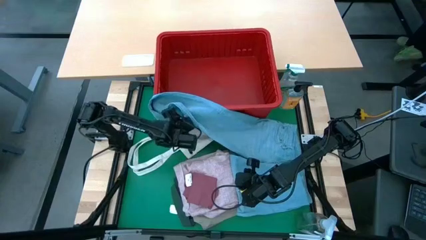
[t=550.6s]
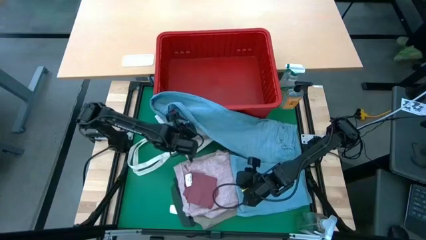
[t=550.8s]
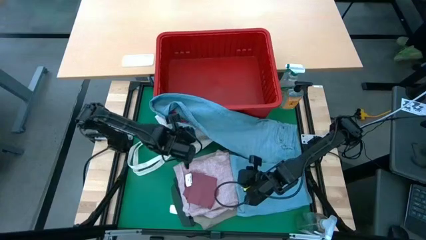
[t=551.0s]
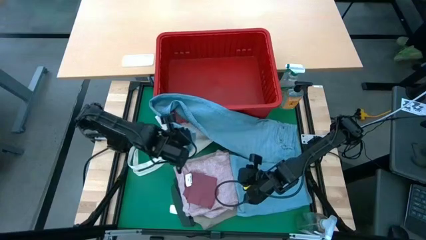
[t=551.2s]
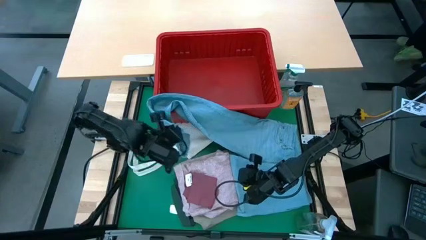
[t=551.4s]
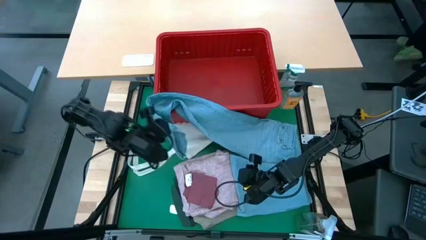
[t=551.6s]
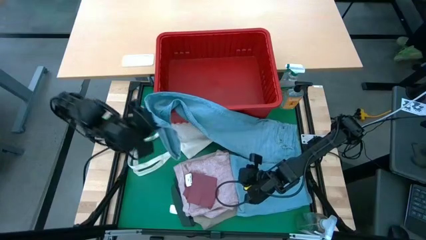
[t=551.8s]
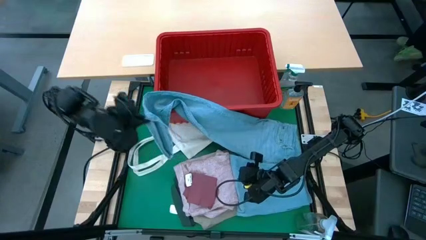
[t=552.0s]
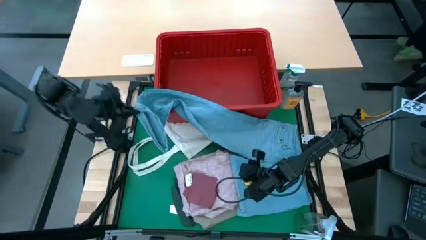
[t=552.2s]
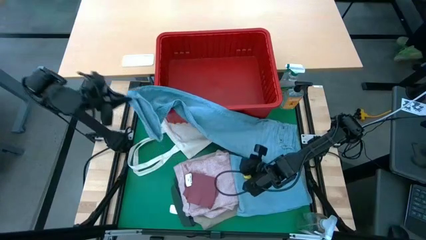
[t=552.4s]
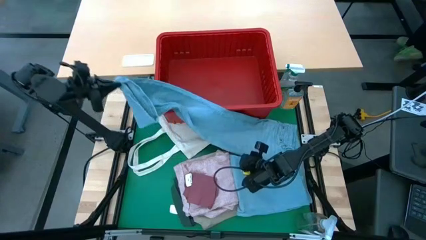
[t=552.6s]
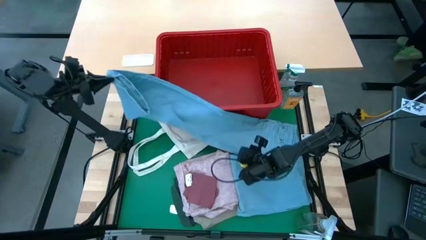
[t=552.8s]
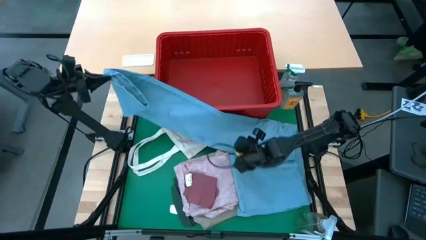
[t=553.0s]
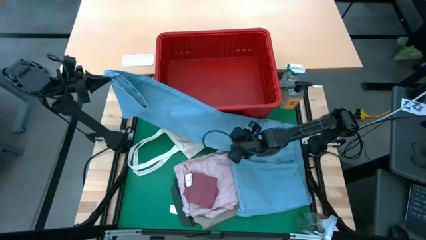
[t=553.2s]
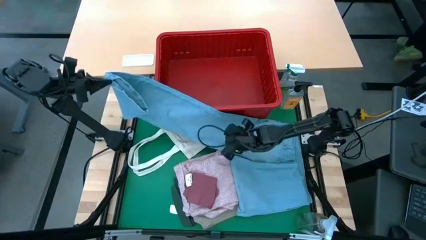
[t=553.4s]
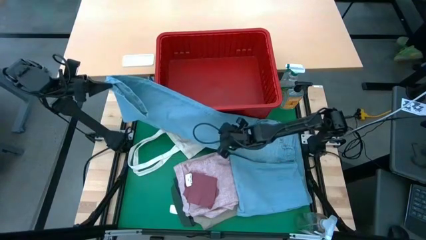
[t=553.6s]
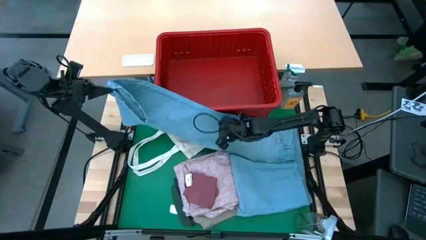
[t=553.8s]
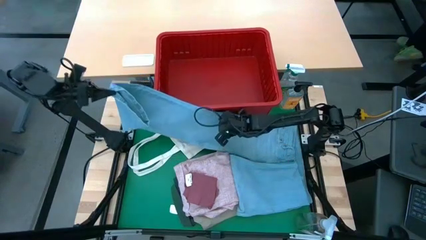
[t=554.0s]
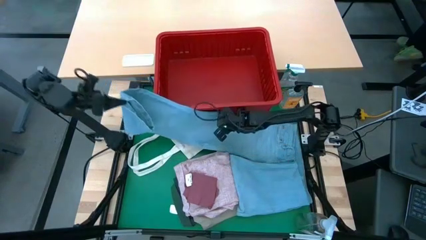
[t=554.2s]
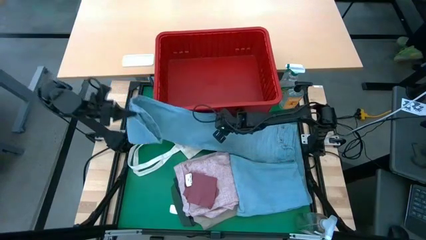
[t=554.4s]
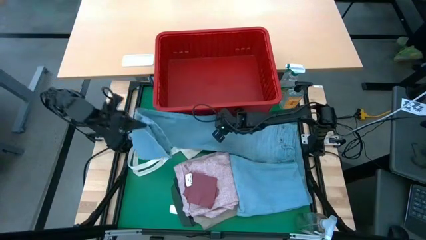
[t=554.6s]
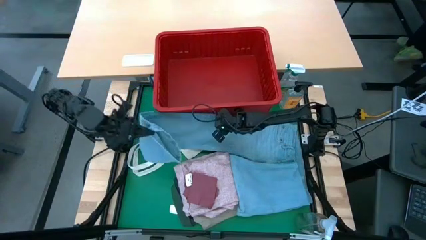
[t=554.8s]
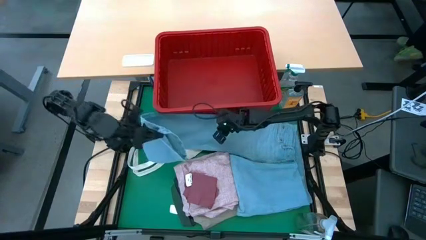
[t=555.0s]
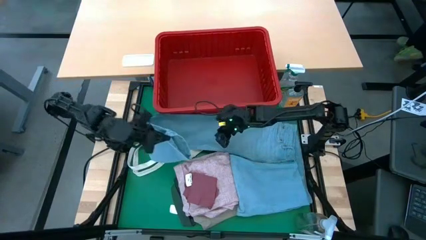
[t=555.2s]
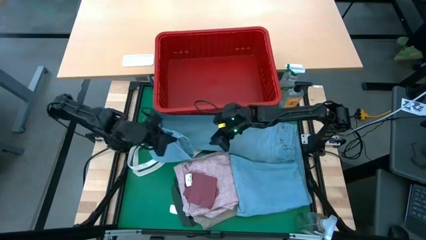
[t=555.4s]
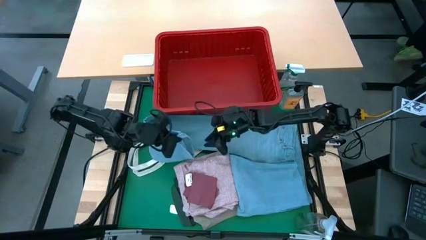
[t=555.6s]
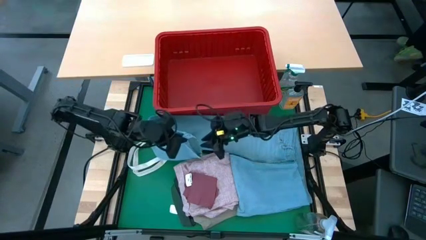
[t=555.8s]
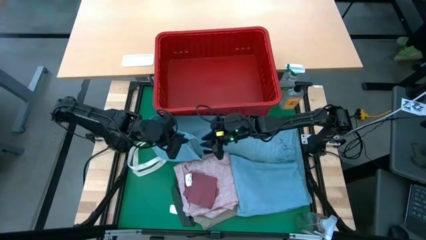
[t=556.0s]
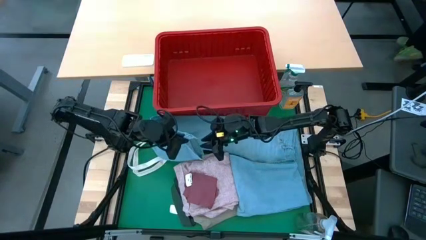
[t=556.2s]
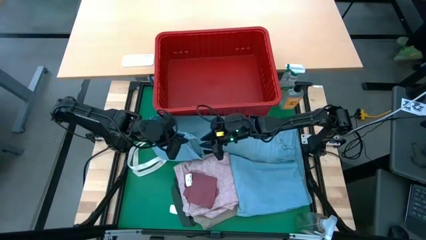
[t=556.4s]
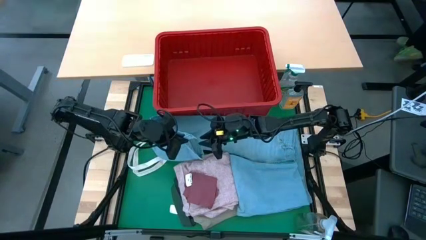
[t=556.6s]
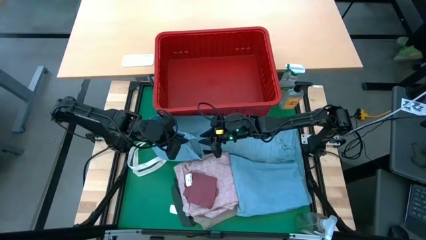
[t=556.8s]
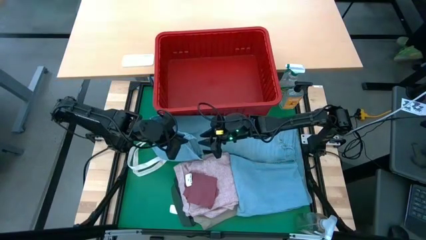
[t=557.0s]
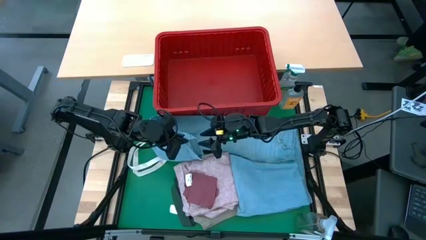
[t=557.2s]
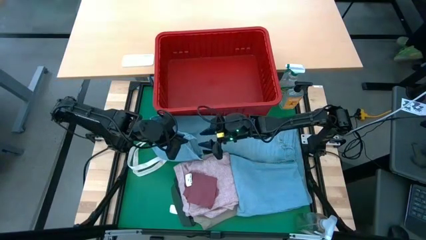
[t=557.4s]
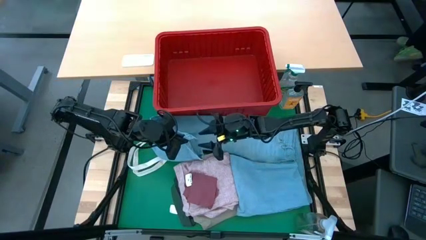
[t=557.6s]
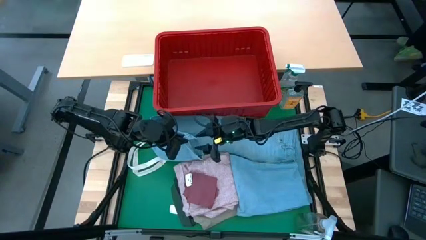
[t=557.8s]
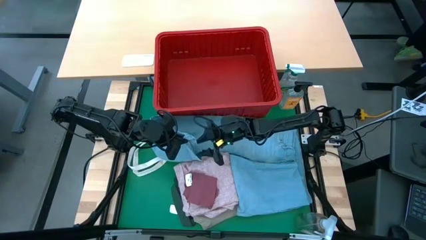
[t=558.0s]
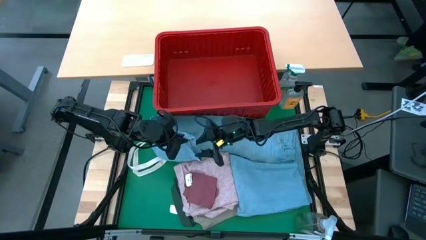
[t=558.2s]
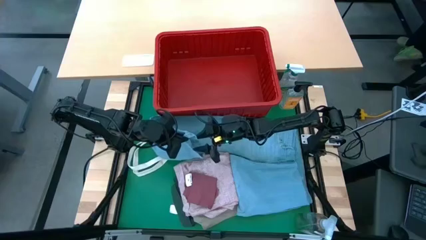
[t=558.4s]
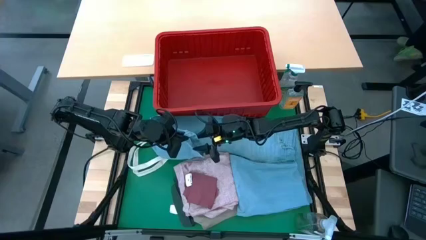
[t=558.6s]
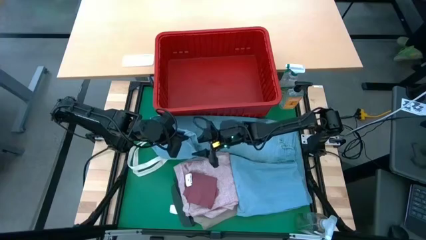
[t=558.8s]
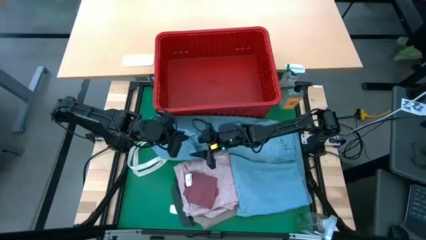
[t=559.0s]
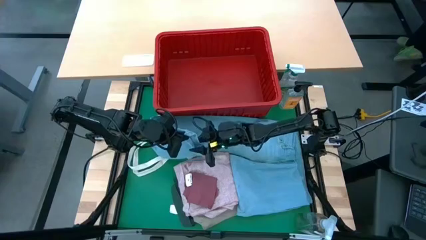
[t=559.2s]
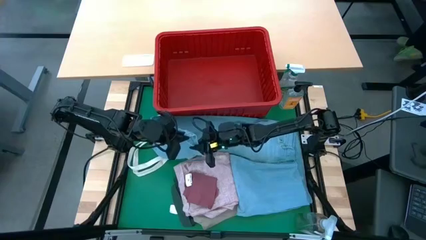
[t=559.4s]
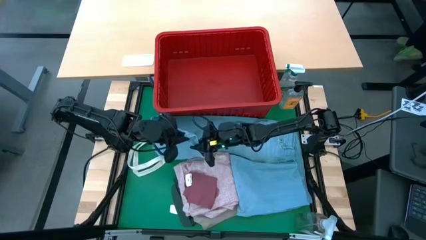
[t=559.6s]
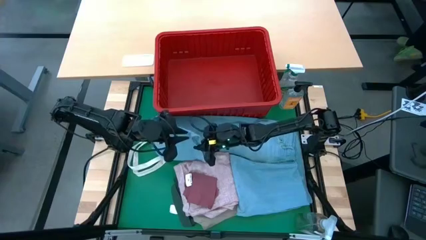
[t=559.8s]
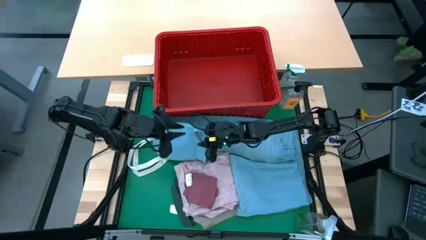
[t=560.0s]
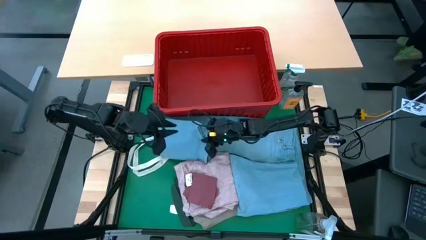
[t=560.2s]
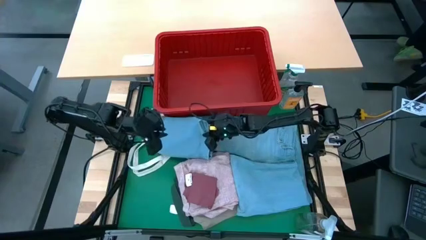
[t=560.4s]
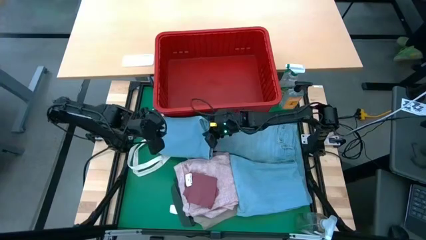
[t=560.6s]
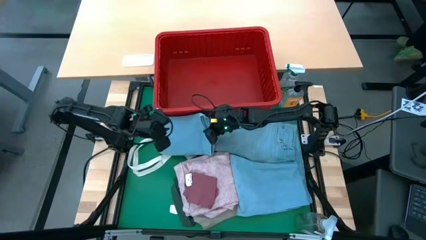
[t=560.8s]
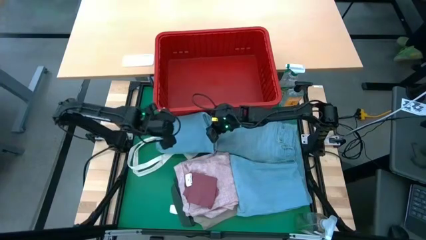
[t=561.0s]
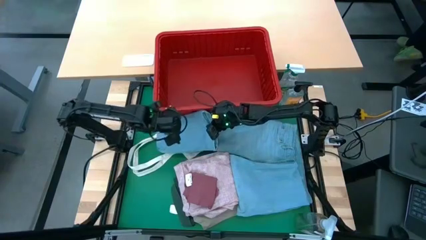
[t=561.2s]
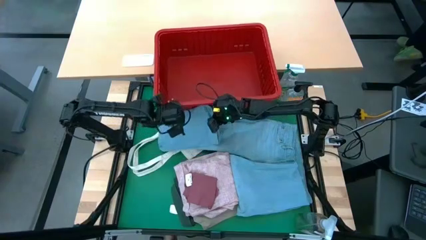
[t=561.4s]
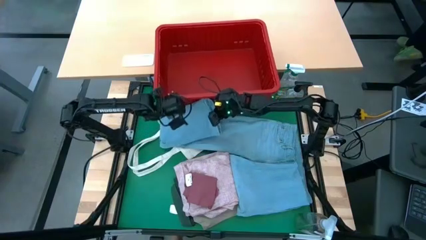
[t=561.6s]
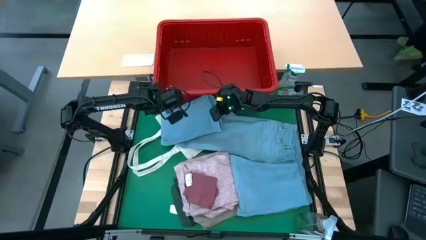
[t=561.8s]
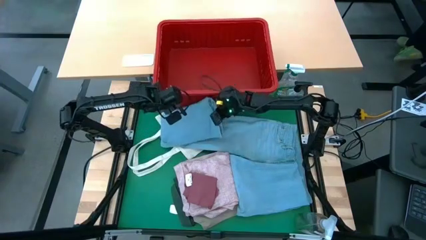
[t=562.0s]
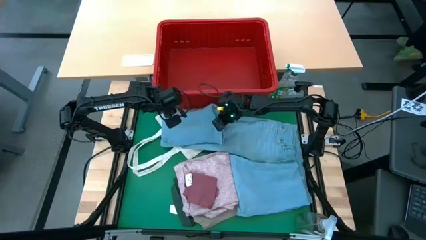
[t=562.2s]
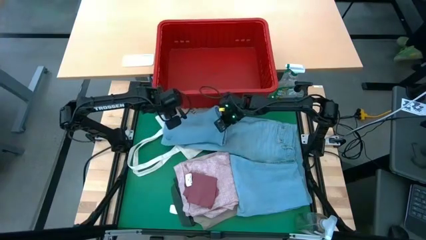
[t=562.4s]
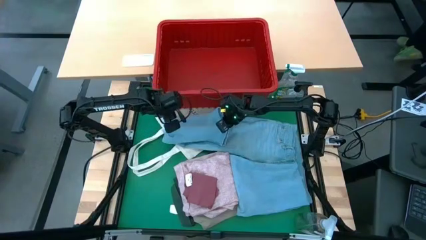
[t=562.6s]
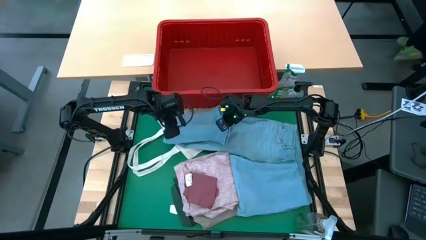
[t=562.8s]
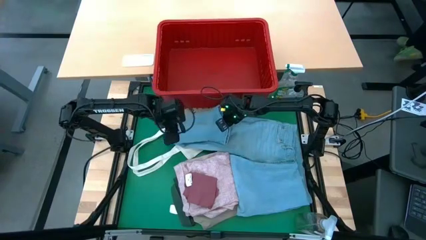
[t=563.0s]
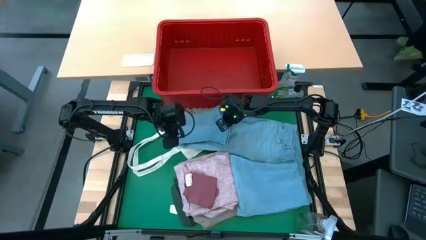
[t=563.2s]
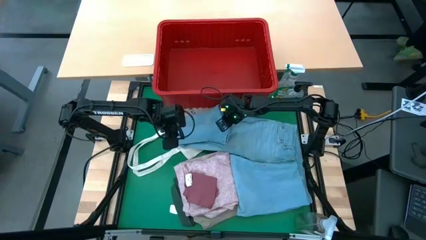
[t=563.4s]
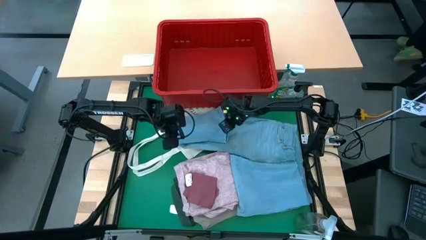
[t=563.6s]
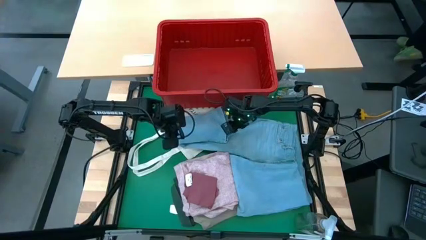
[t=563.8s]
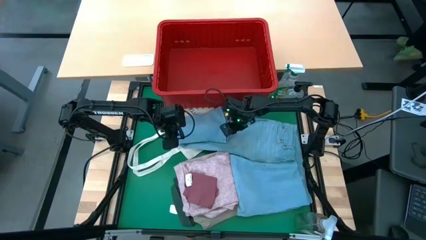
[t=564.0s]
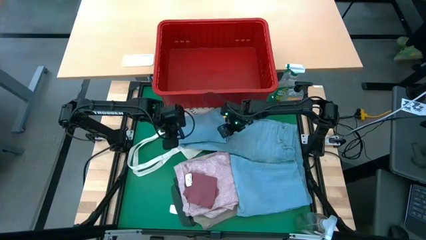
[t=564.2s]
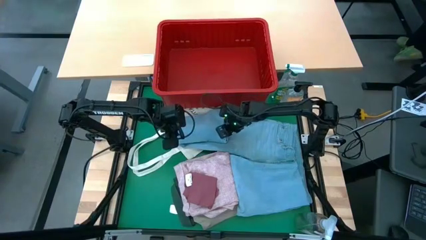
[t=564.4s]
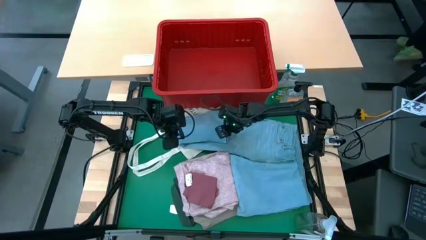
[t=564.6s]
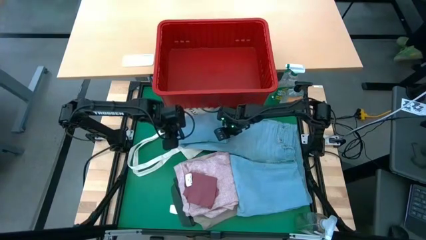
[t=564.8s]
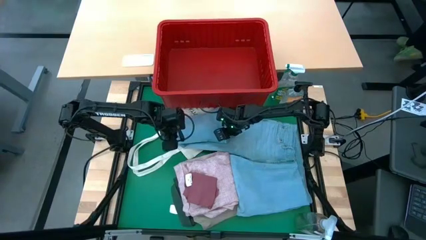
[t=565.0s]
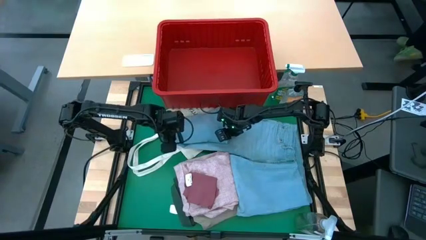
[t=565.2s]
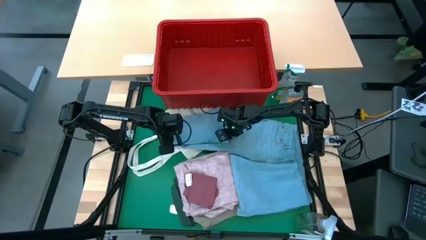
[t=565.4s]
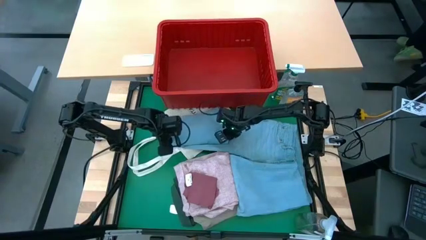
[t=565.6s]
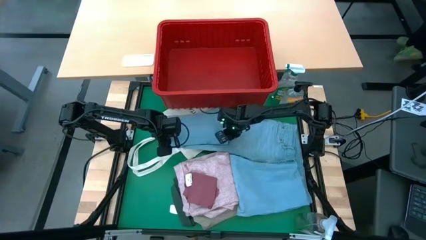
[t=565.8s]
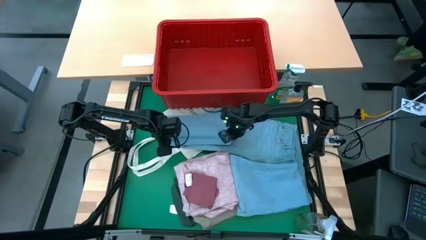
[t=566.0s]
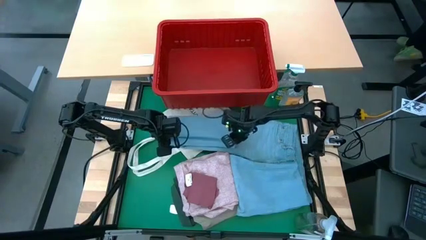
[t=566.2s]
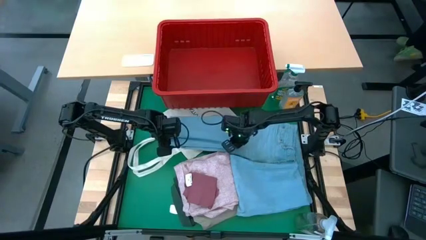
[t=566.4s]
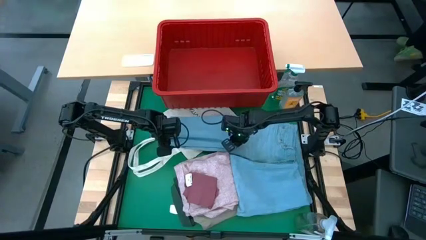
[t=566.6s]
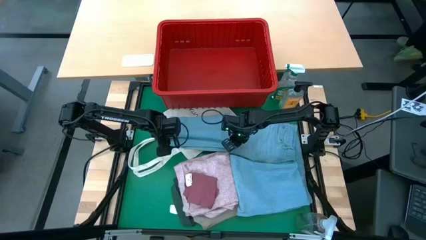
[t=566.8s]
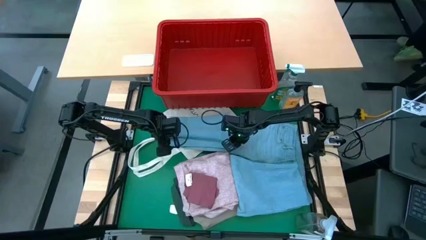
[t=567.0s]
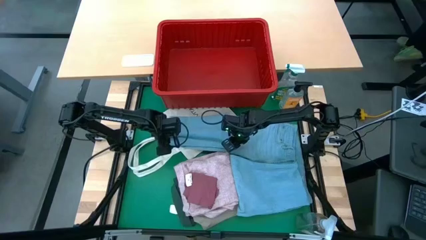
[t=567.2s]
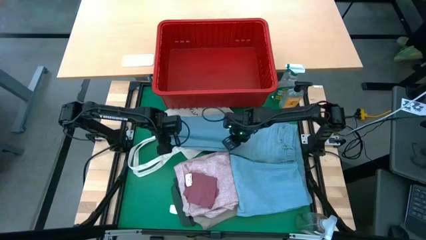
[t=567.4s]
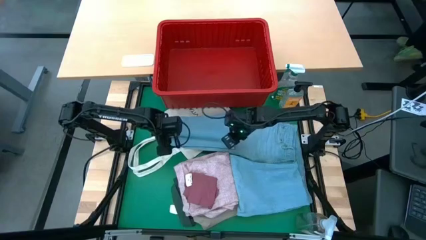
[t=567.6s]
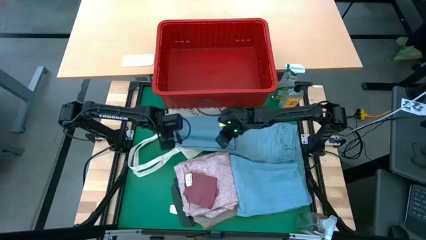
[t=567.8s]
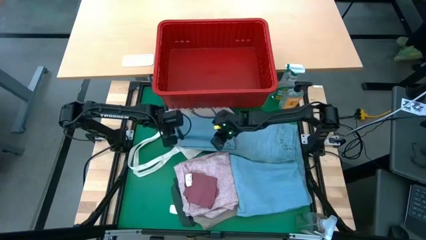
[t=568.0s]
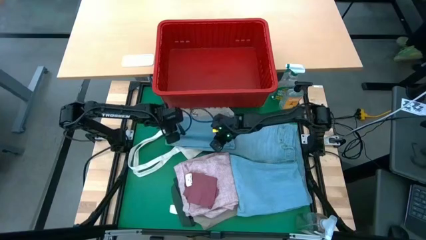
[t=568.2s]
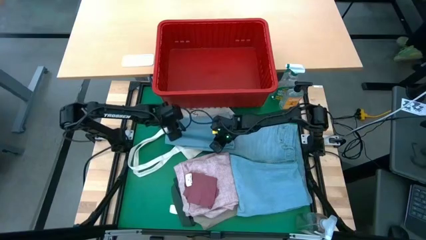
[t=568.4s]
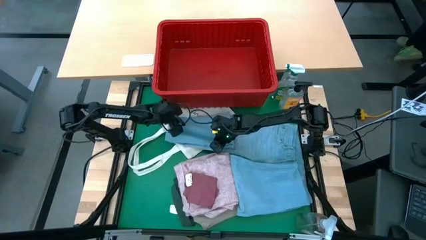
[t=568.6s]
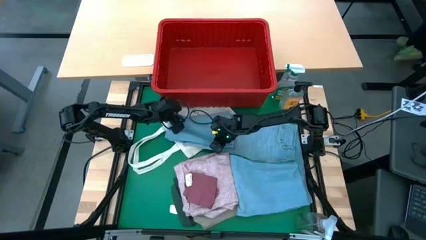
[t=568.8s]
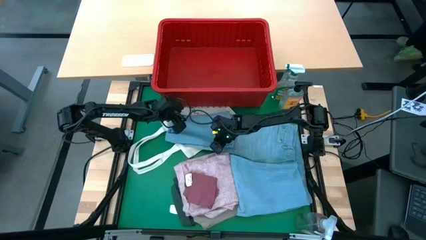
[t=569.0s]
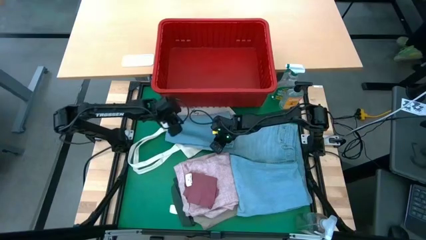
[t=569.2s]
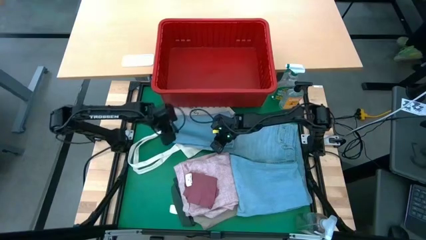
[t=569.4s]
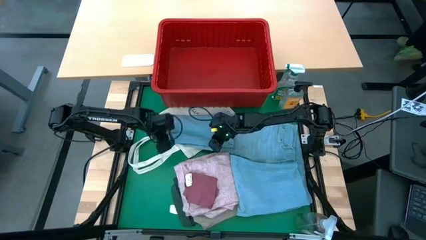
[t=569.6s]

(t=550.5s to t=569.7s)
Task: Fold laundry
Fold the blue jeans
